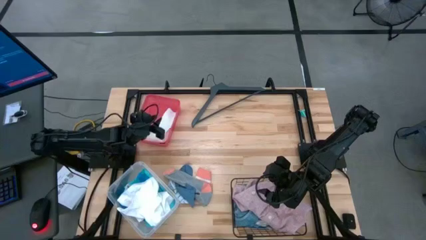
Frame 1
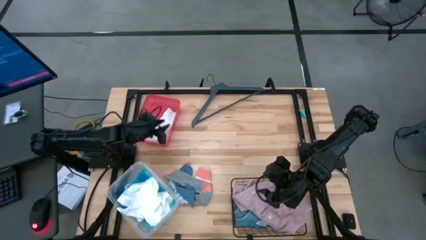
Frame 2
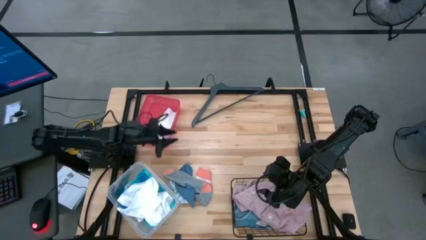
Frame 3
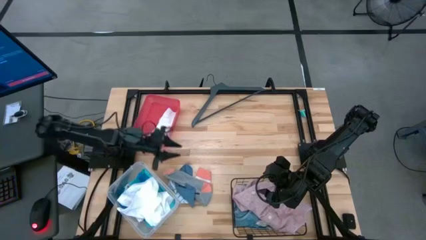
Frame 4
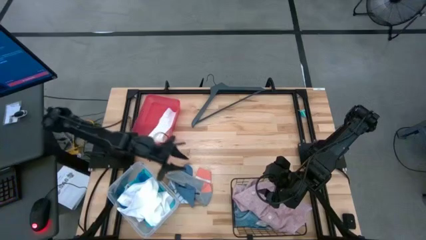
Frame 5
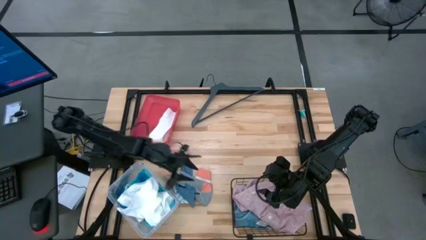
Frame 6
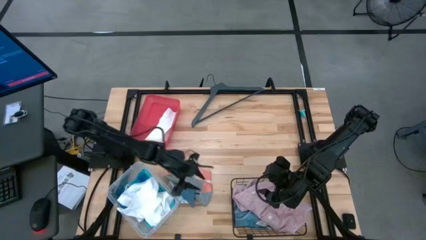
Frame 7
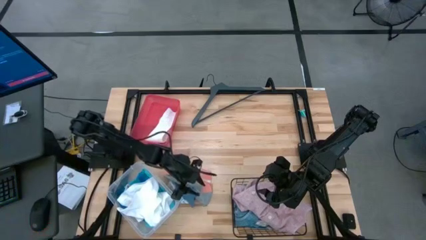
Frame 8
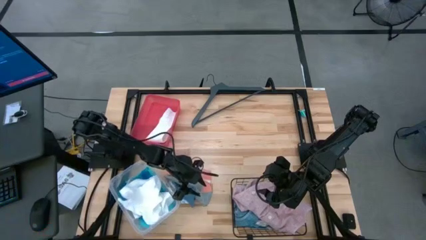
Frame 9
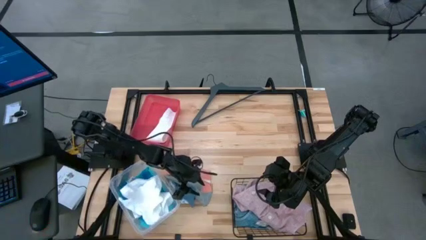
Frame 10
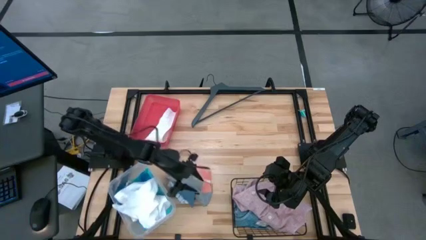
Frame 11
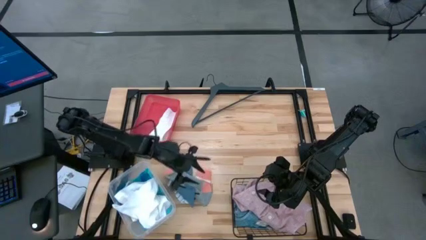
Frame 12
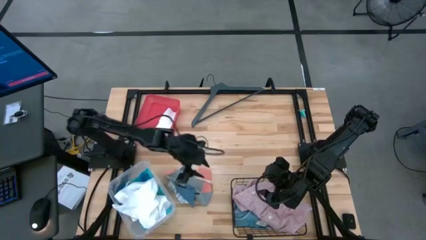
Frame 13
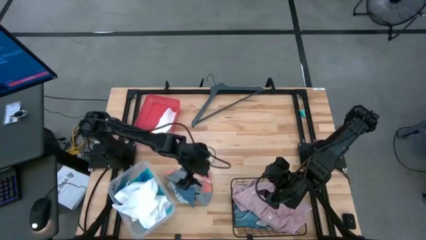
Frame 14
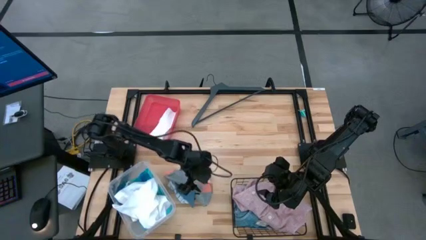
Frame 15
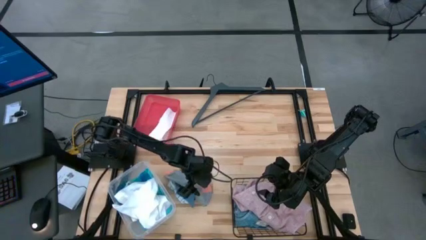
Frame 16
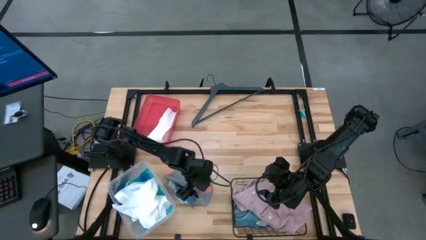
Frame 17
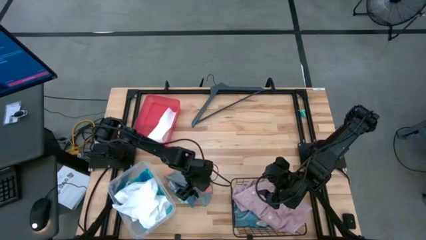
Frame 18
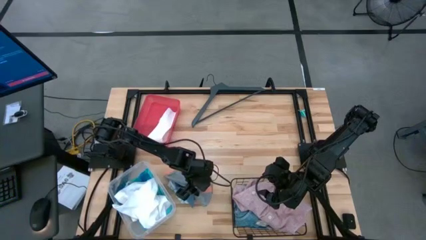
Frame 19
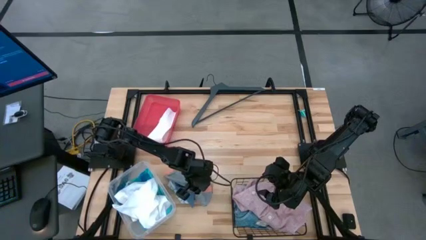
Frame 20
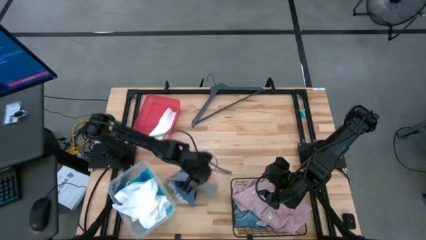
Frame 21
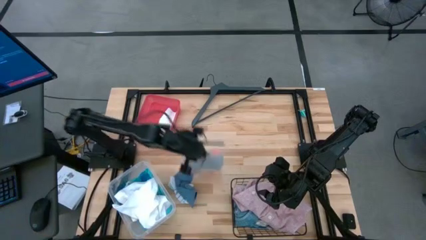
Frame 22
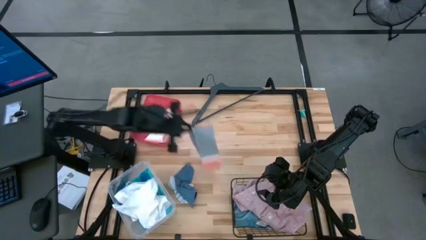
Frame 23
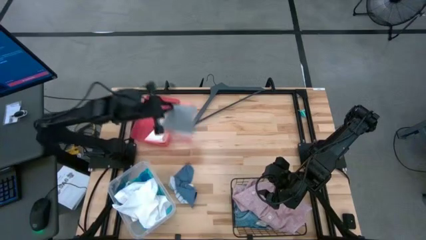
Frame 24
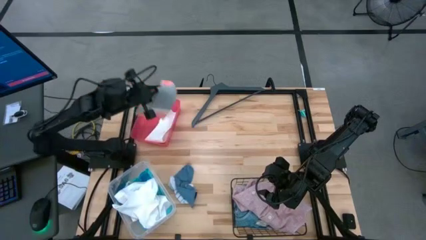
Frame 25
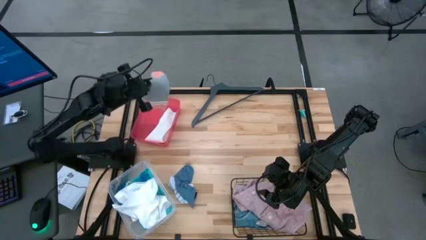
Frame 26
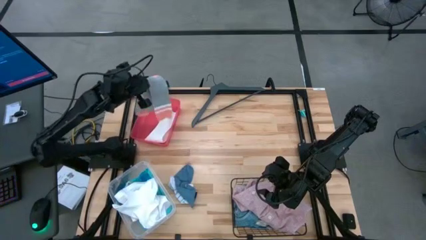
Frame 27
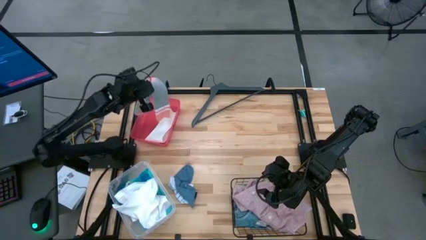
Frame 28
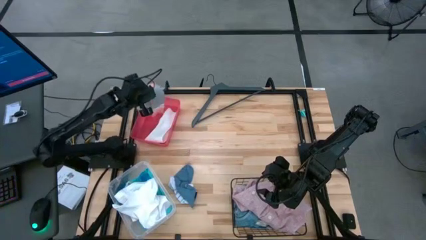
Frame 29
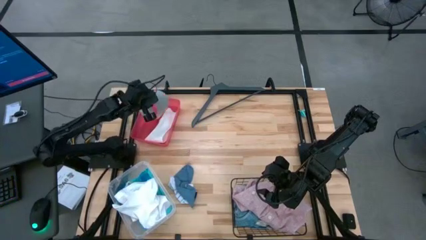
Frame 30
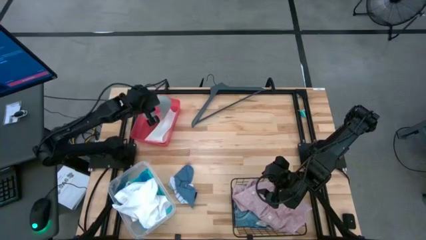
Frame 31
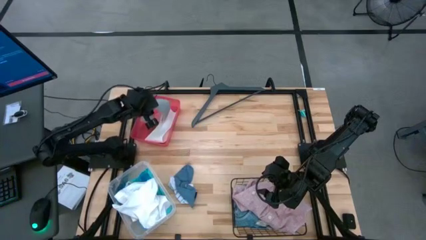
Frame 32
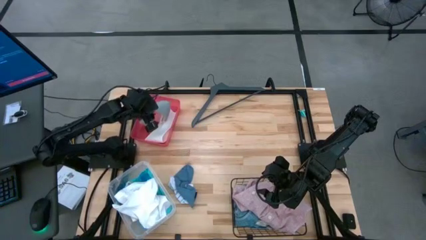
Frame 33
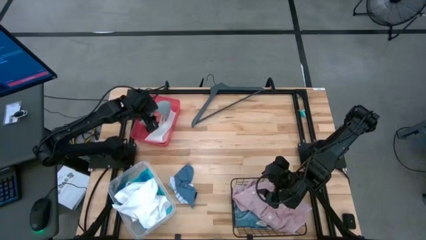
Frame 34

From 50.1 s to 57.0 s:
Task: Pick & Place Cloths
Put the orange and gray sock into the red bin

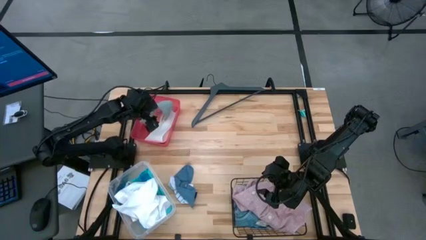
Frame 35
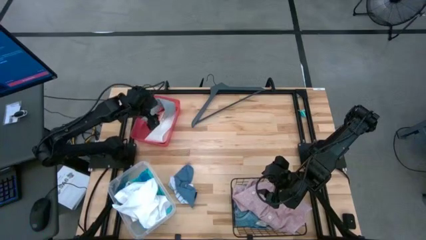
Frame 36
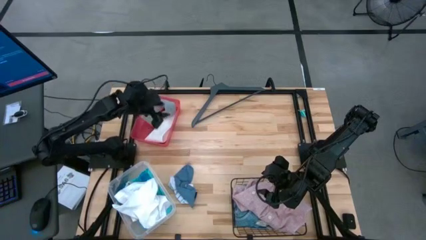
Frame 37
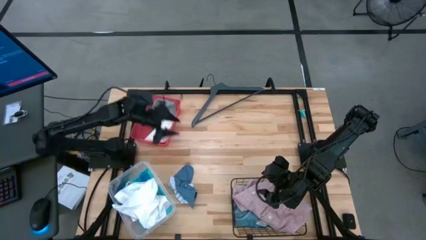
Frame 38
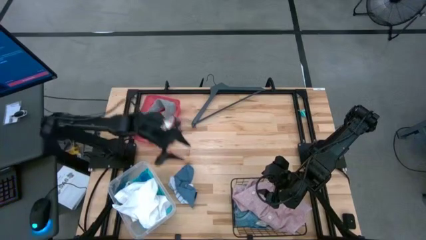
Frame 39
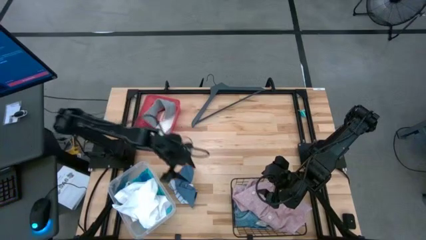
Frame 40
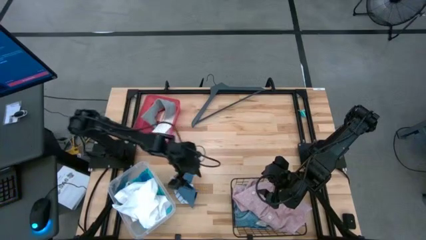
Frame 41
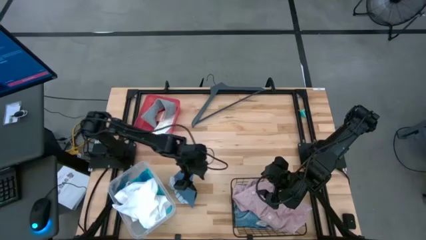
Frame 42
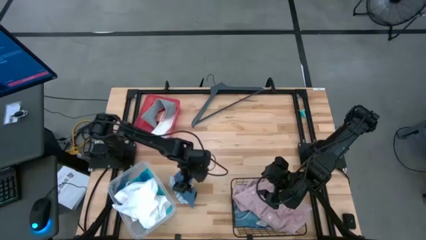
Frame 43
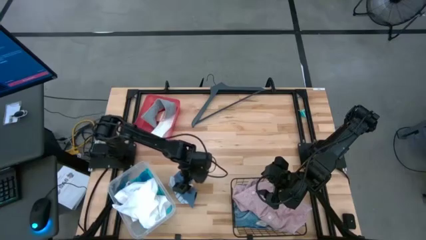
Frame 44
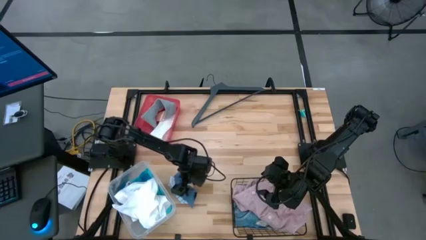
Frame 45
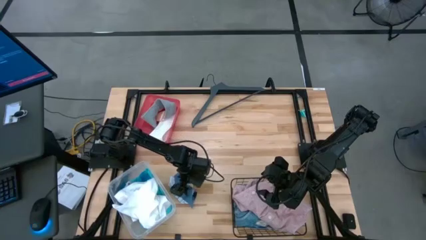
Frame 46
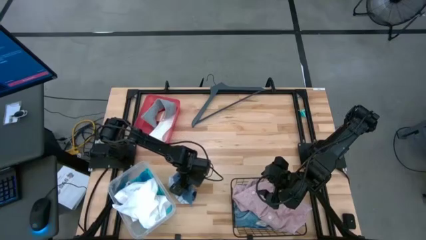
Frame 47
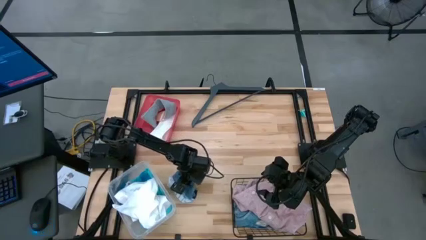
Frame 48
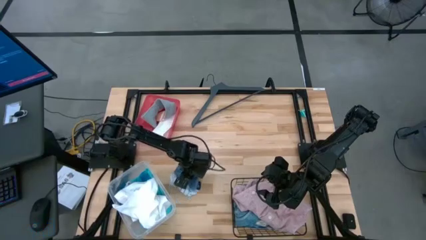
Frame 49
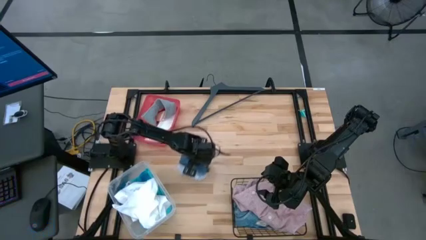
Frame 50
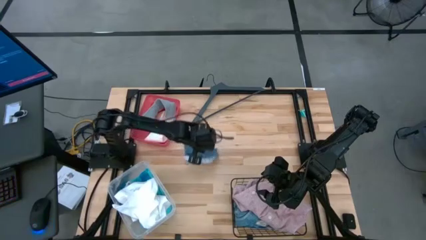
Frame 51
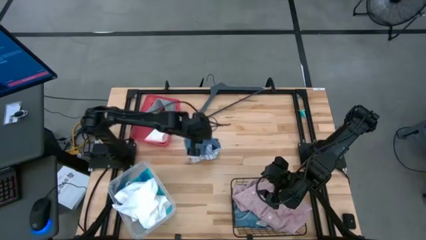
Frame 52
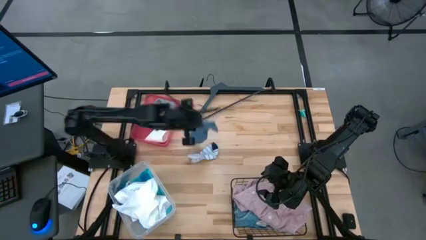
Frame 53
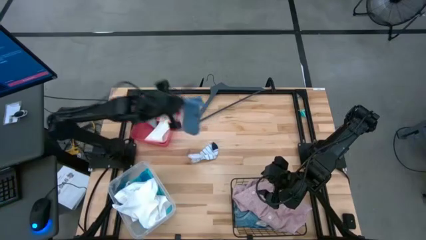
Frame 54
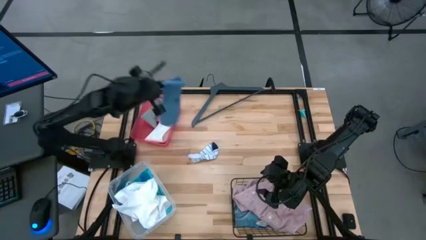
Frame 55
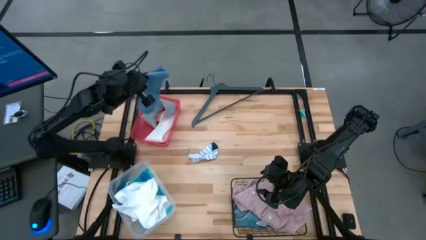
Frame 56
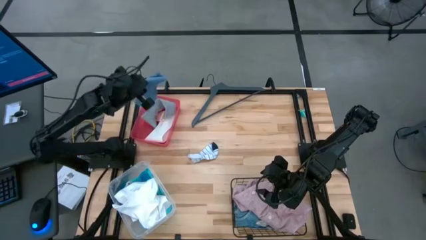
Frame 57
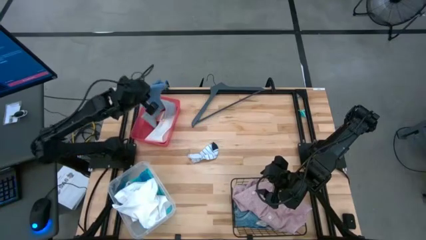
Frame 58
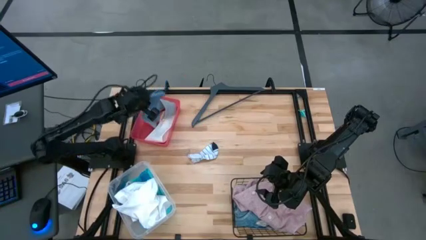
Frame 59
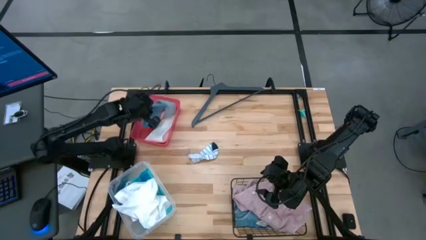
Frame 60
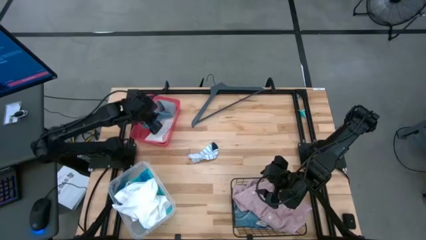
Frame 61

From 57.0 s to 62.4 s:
Put the blue sock into the red bin

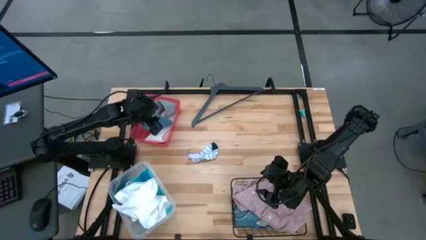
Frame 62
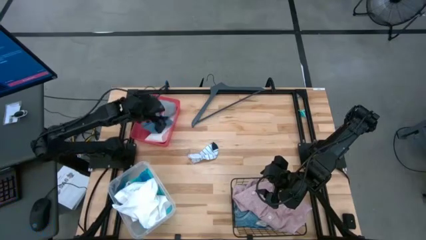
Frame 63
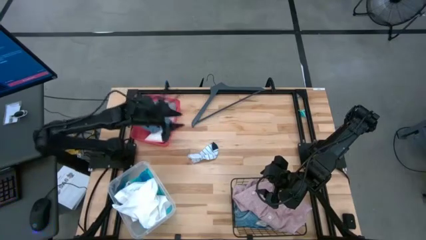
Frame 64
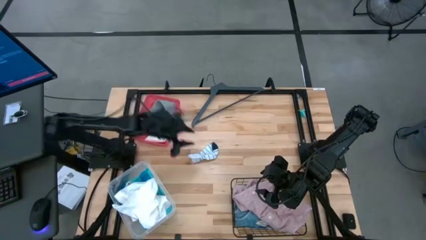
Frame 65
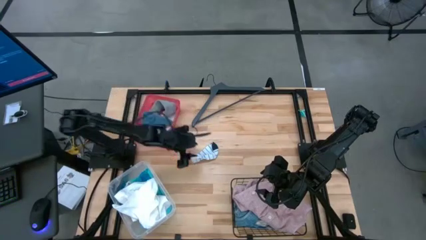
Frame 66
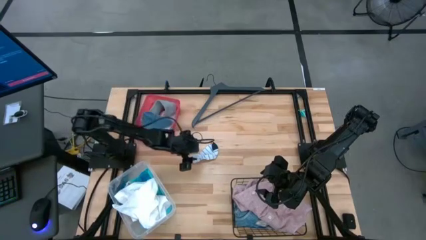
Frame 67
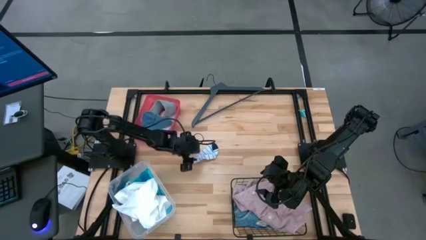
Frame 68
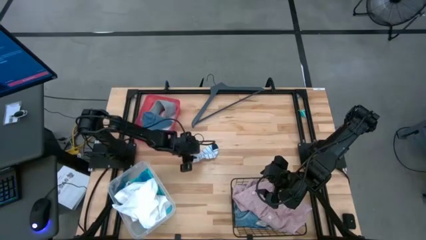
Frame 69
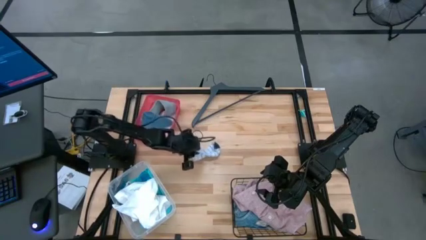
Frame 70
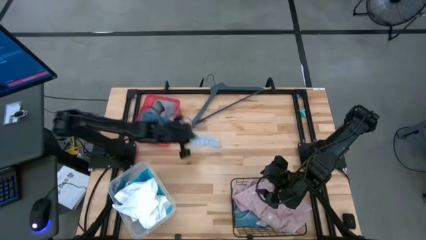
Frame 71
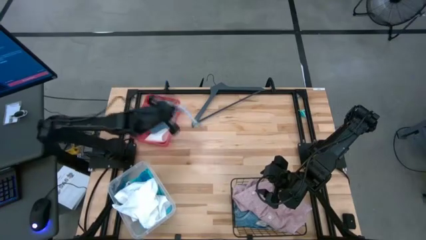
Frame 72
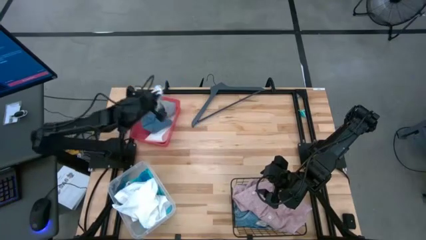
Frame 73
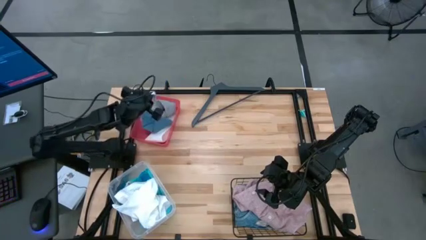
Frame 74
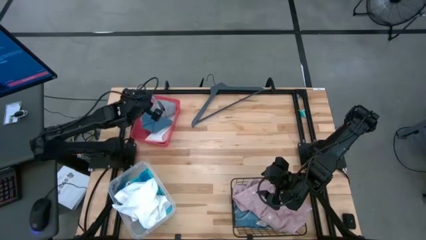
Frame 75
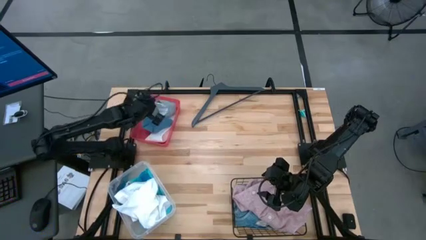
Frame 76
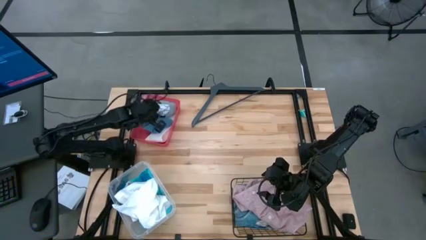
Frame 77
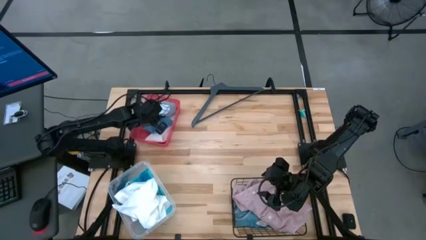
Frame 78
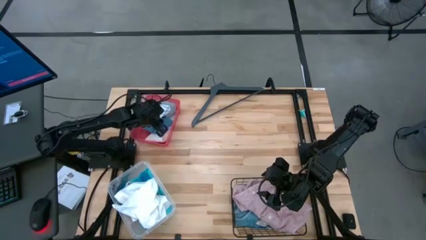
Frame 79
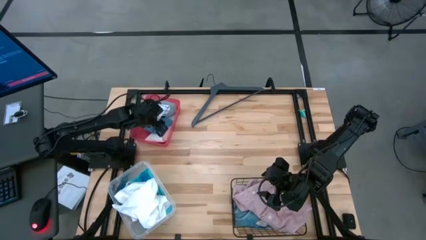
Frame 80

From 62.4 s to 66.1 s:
Put the white striped sock into the red bin
